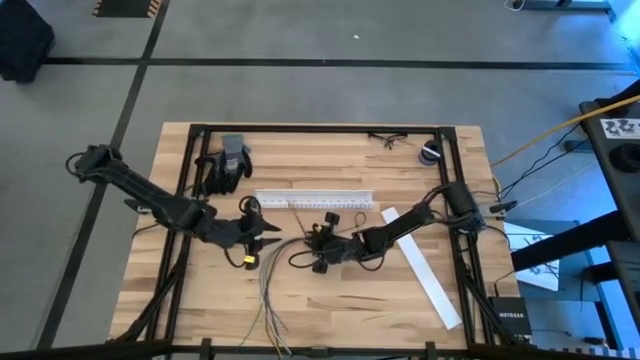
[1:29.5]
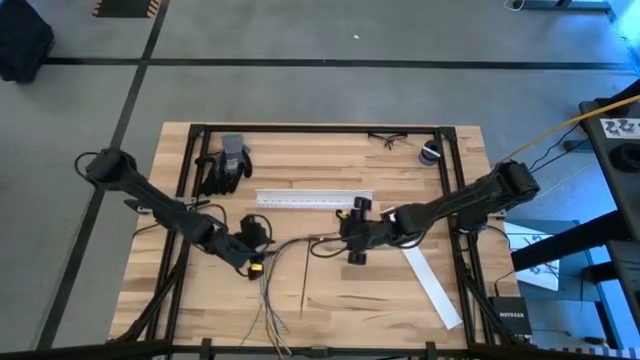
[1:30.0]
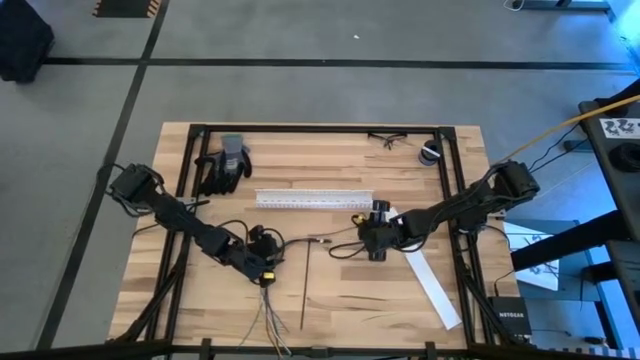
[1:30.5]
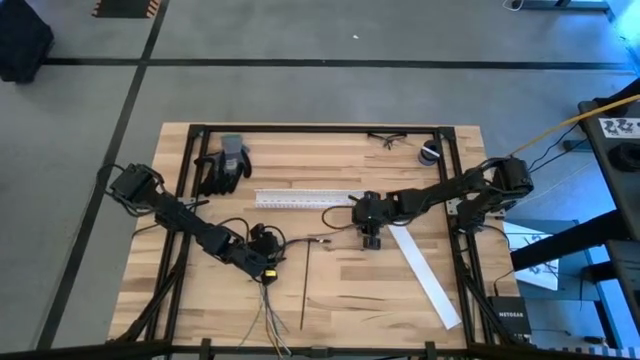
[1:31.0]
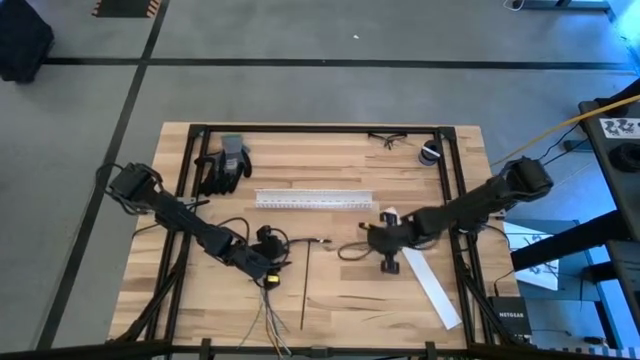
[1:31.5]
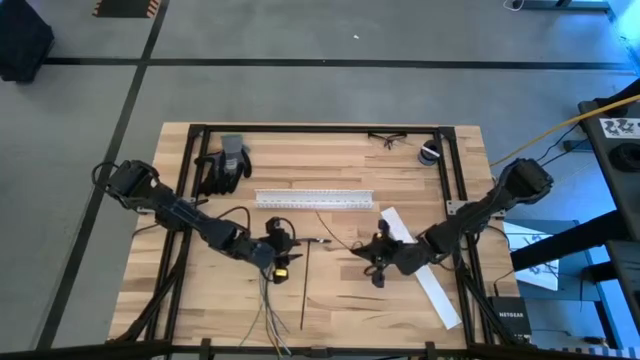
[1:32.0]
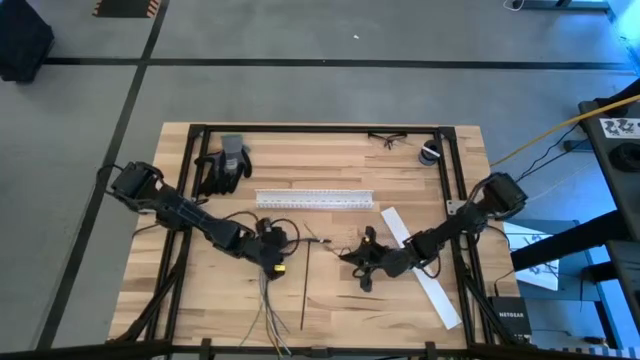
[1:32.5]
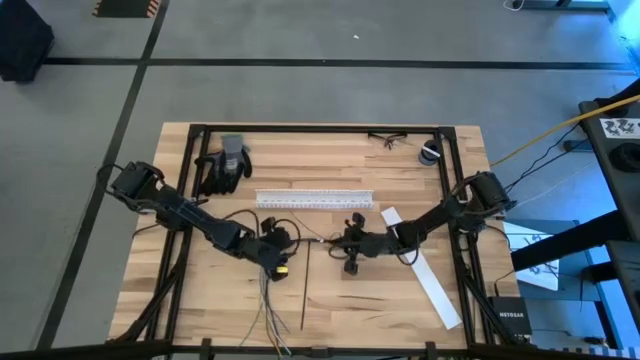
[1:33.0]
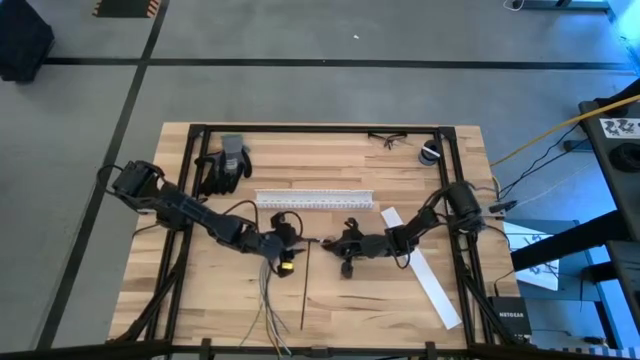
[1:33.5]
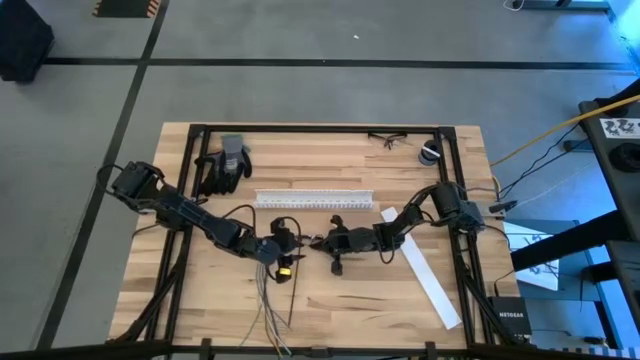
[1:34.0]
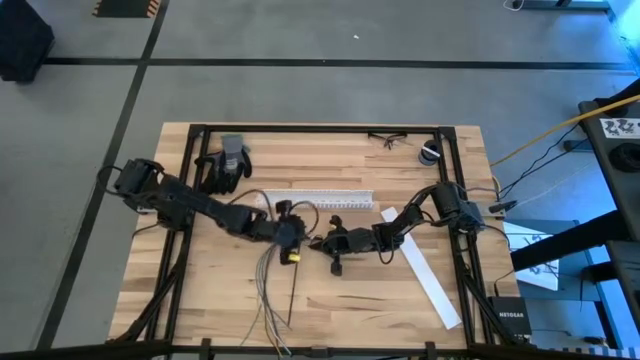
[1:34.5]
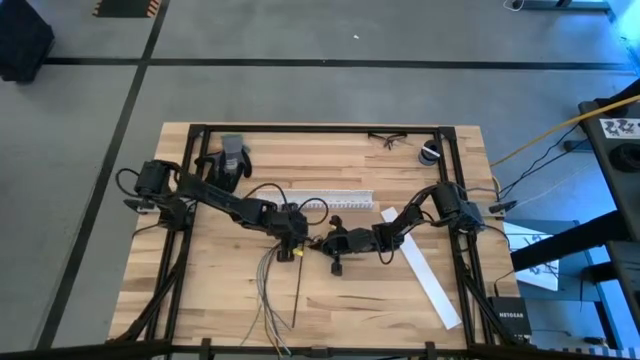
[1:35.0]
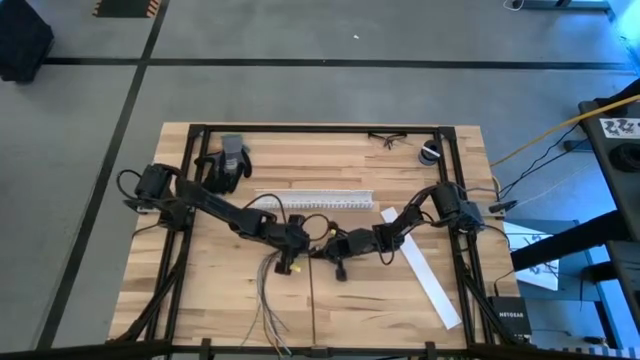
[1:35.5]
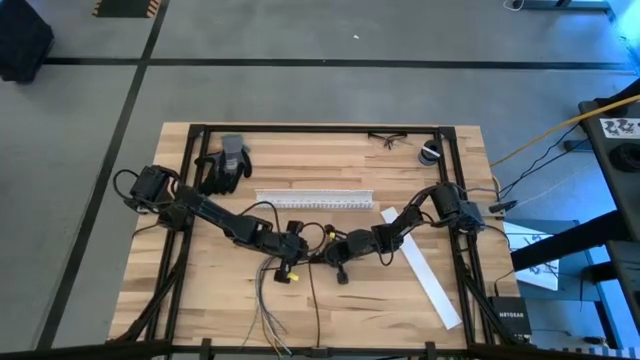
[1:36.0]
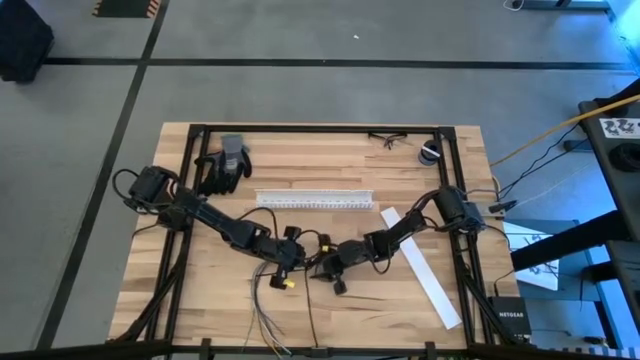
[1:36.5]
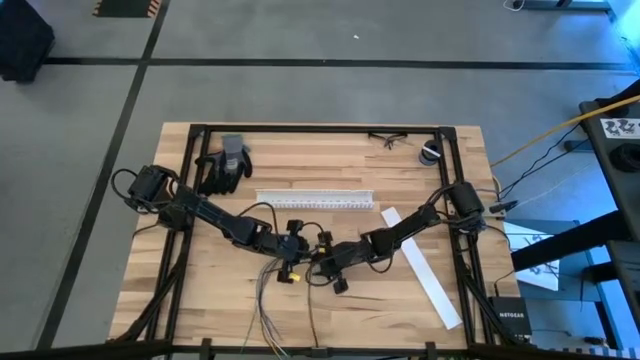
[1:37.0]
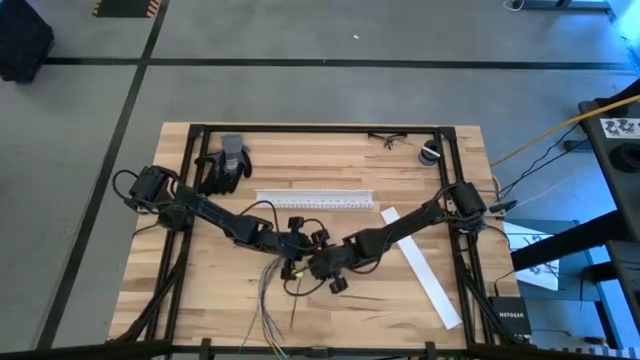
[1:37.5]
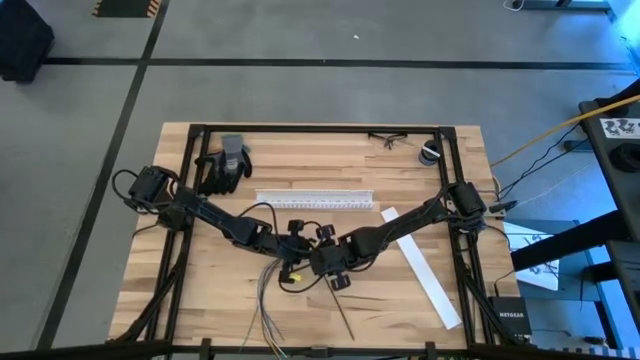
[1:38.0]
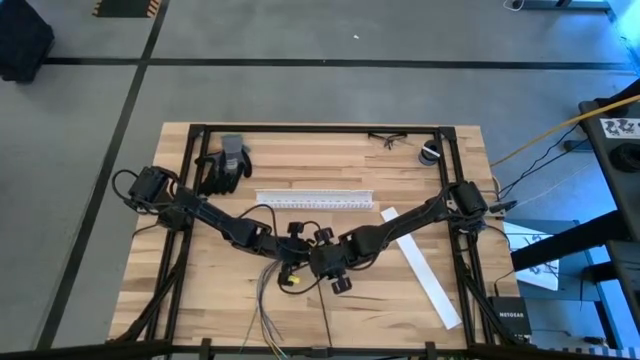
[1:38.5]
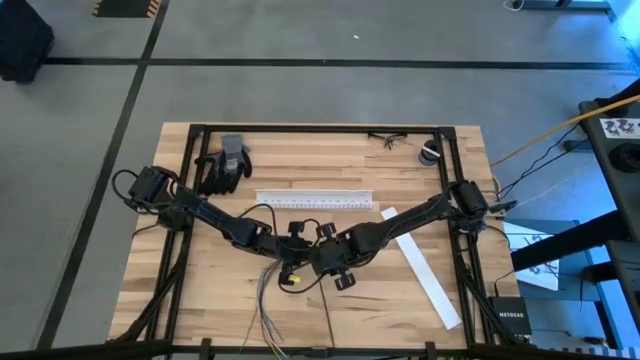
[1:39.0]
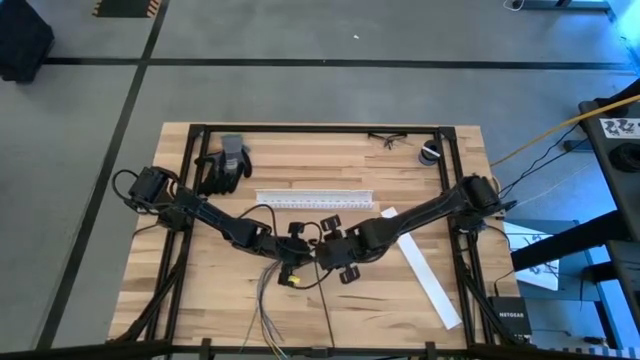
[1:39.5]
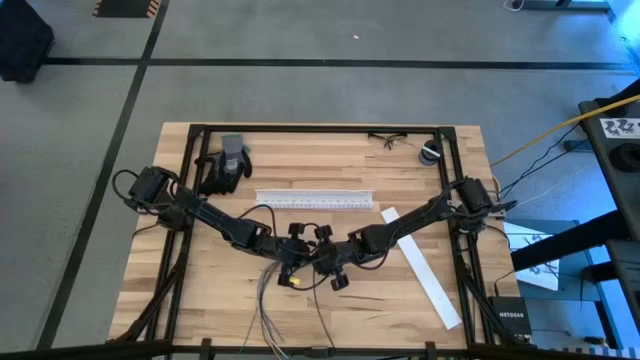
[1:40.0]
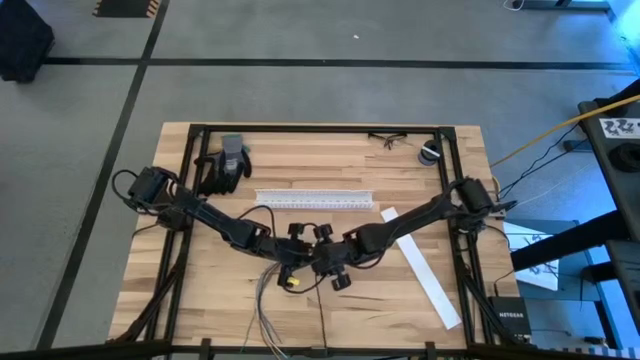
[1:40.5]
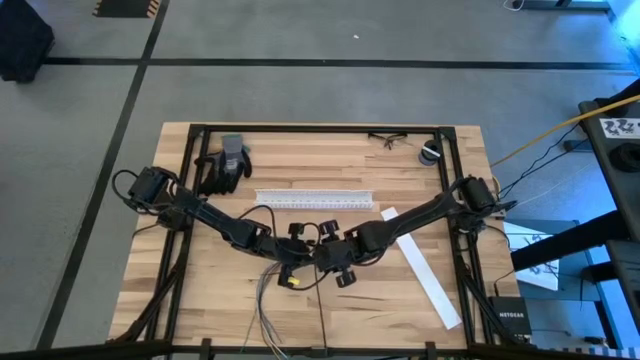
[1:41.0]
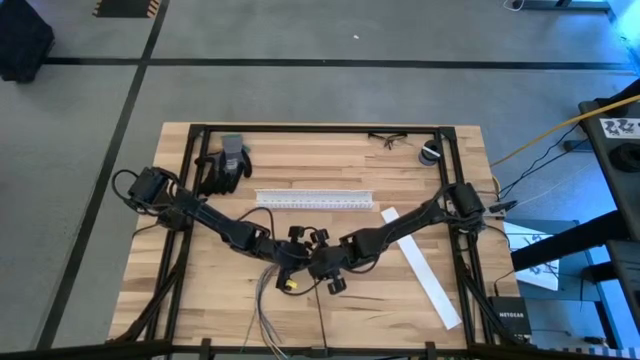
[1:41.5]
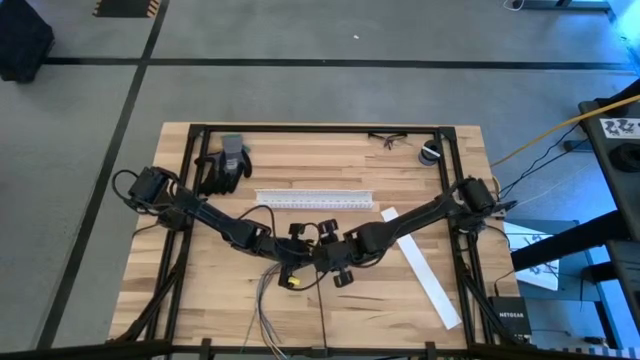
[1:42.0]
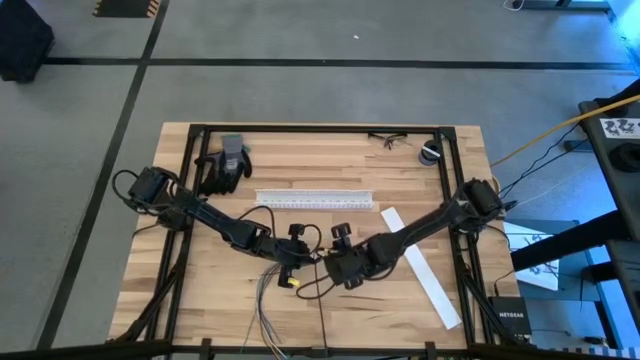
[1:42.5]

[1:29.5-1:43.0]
Task: Ziptie cables
Wrap the cables together using a black ziptie

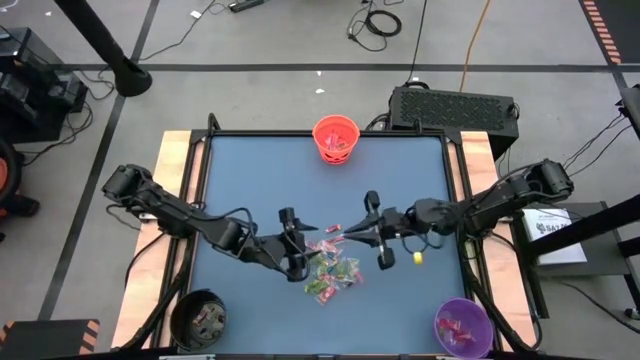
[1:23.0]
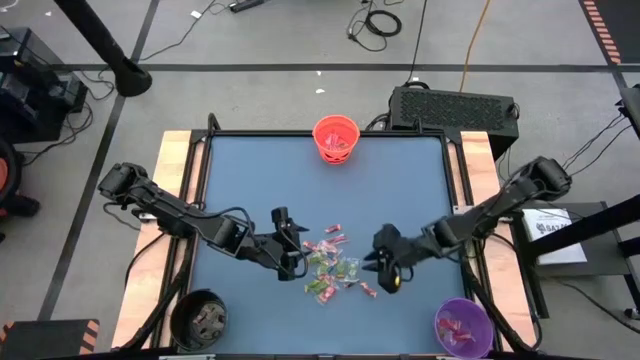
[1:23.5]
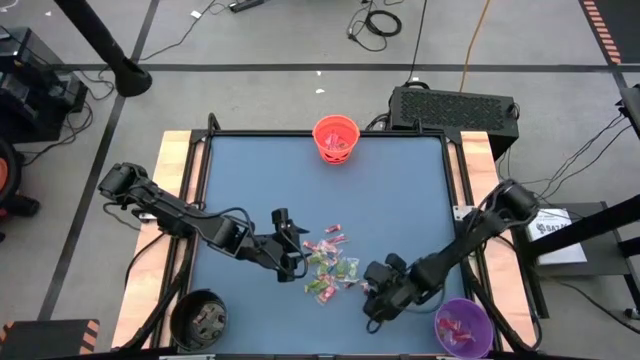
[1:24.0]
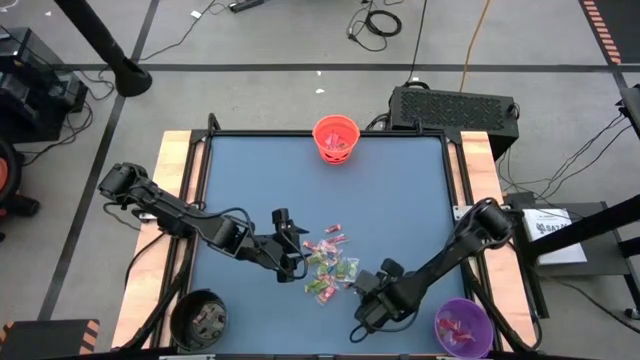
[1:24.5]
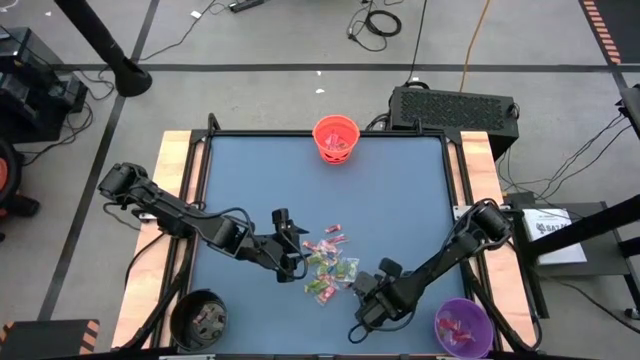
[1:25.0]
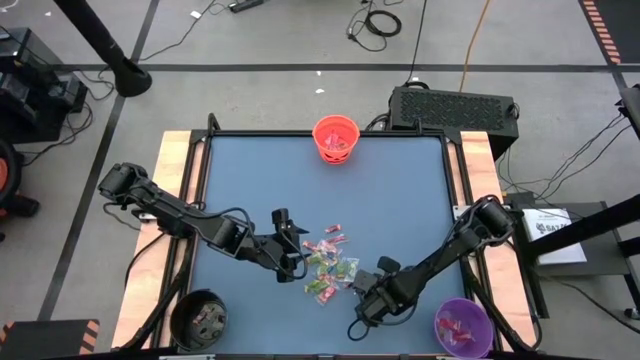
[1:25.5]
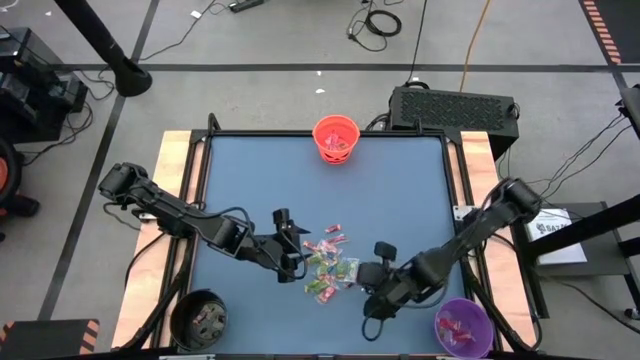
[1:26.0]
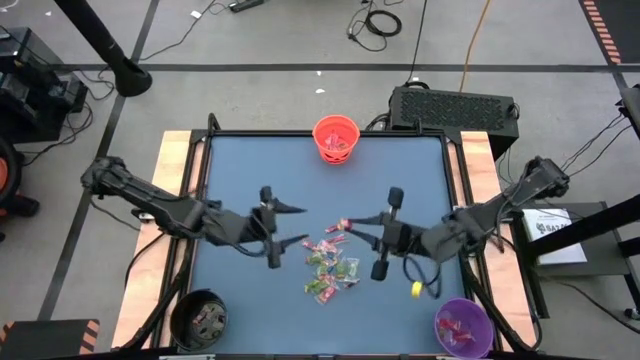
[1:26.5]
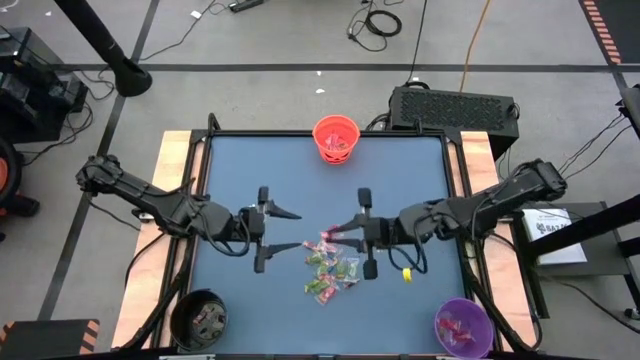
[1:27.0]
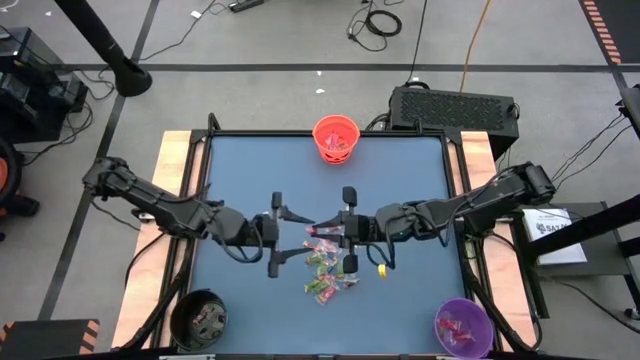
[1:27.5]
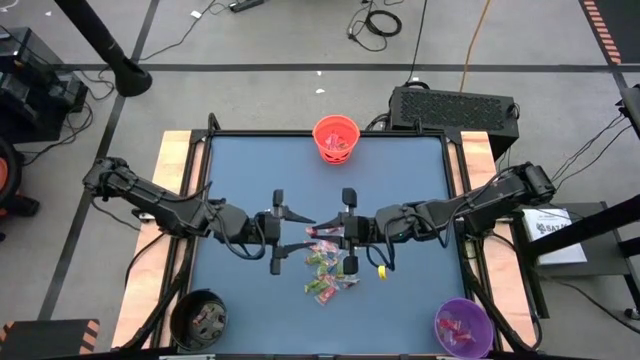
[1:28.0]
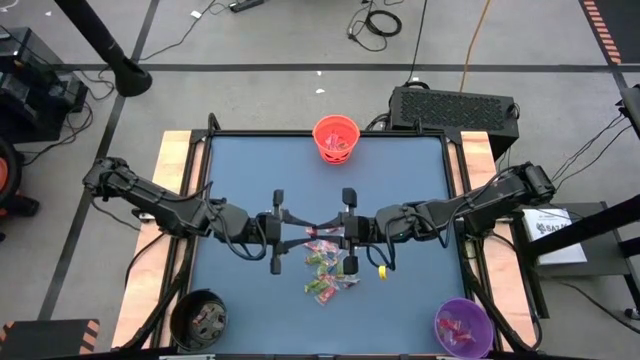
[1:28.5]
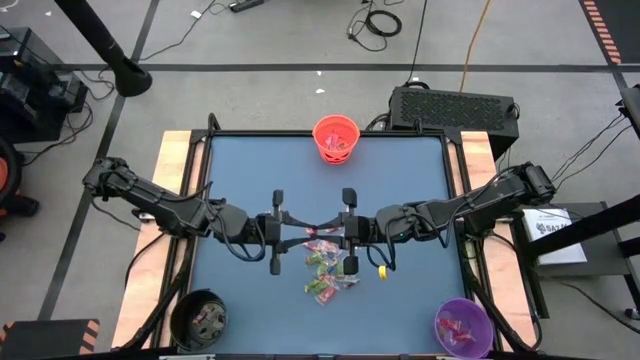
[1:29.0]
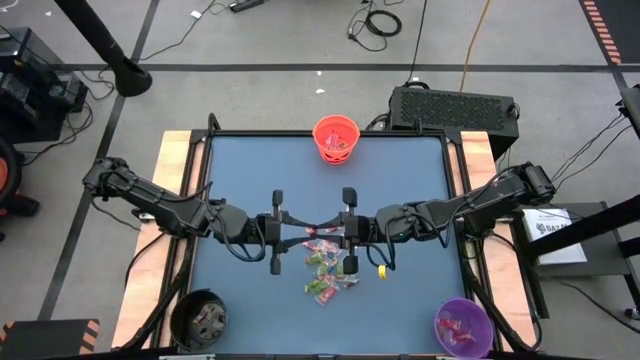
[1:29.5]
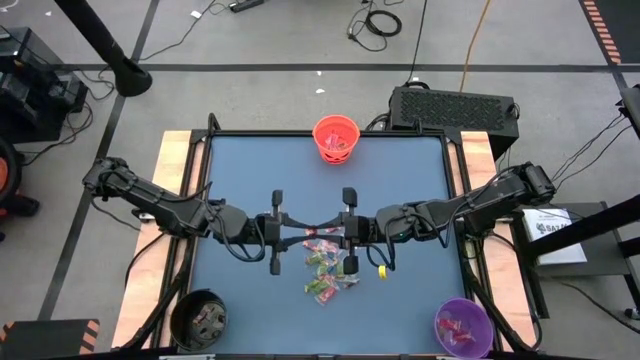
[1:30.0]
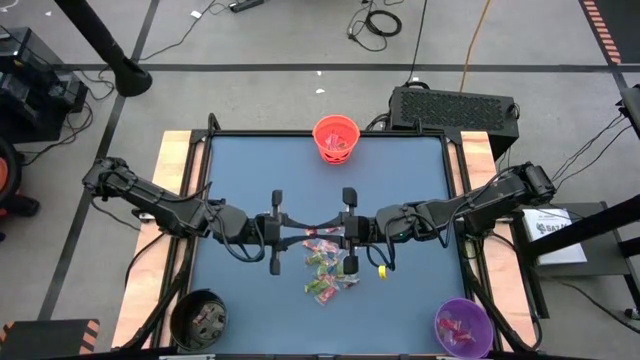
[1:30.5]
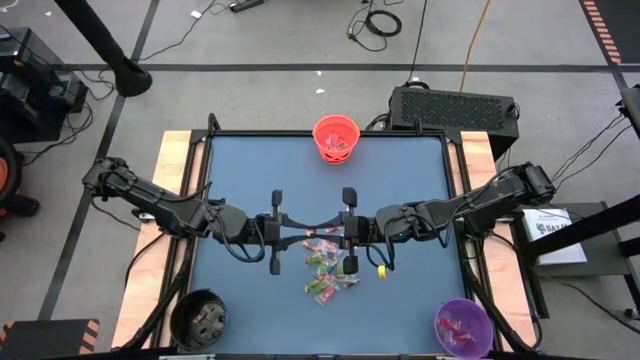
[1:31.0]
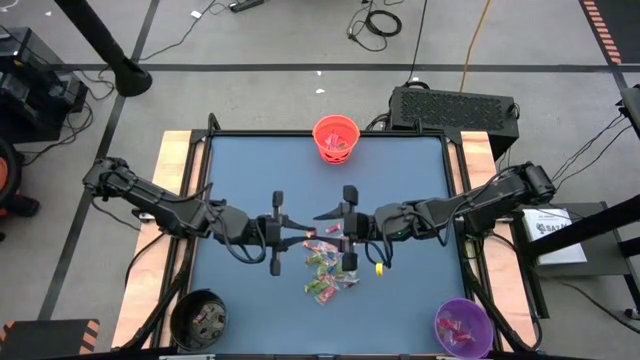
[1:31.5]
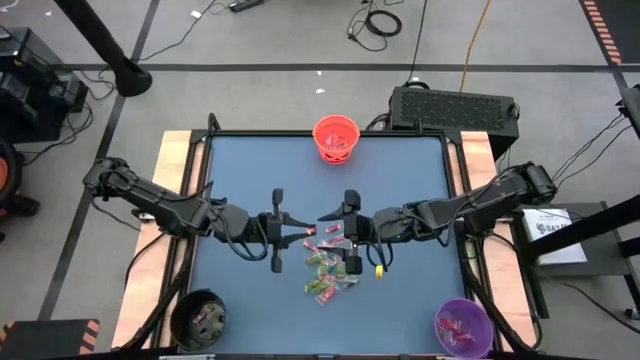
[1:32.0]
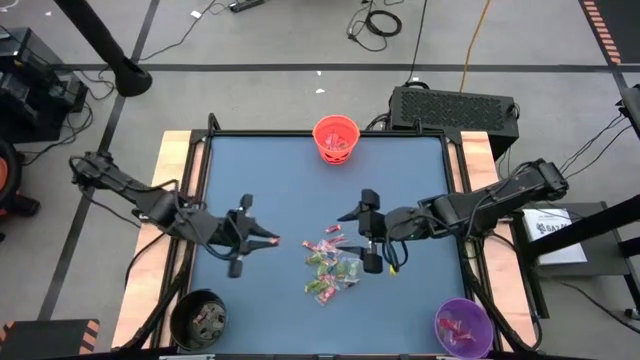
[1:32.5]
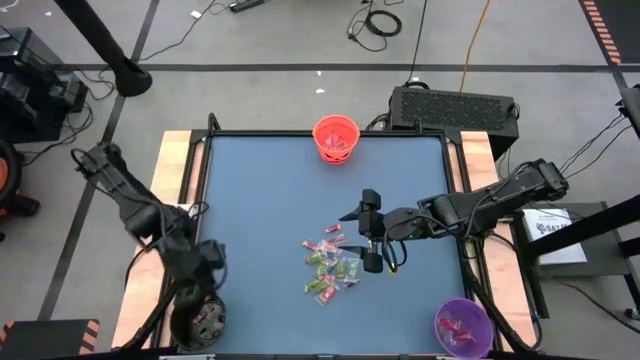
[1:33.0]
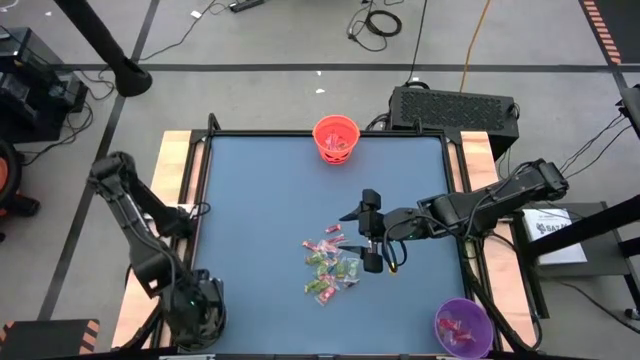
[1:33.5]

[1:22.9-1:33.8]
Task: Sort candy by brand, put in halloween buckets
Put the orange candy into the black bucket
